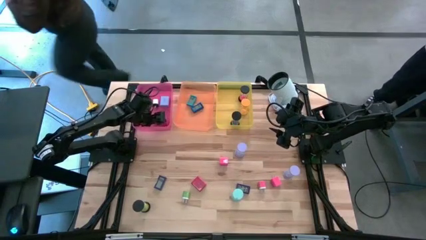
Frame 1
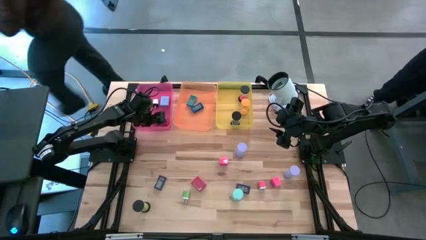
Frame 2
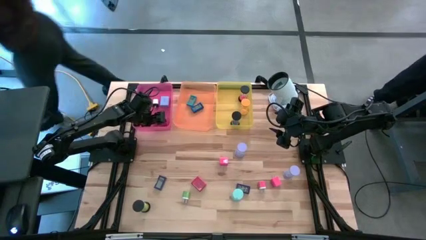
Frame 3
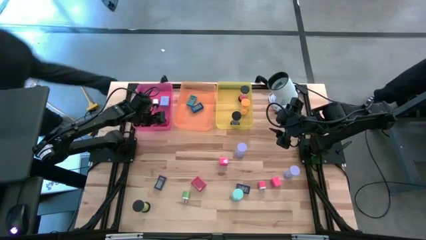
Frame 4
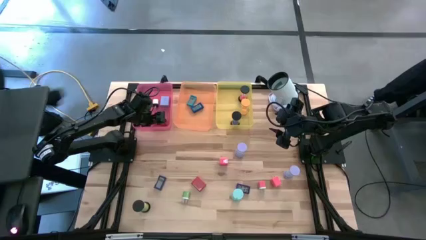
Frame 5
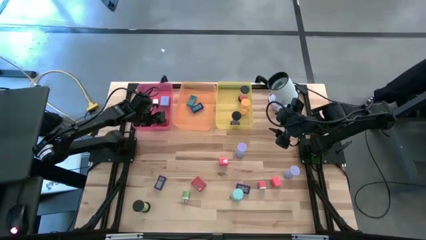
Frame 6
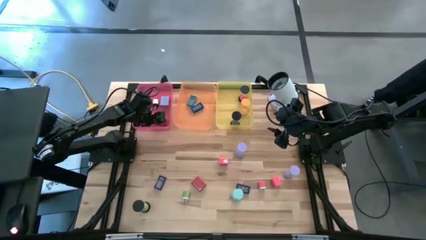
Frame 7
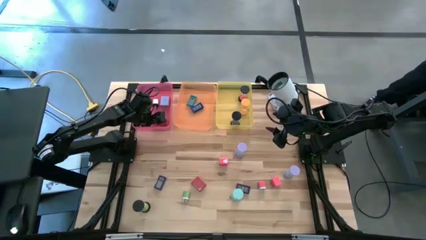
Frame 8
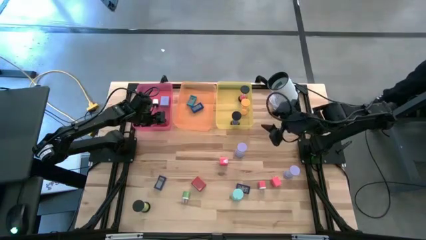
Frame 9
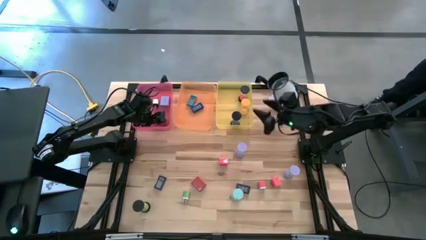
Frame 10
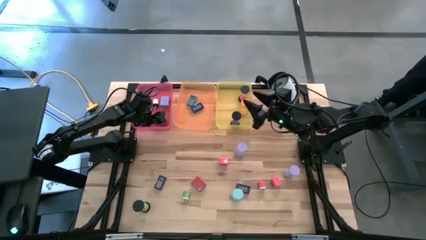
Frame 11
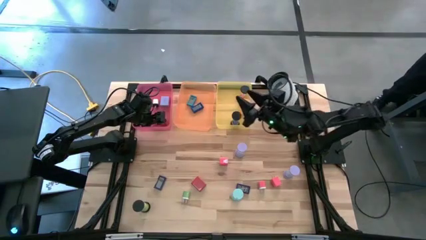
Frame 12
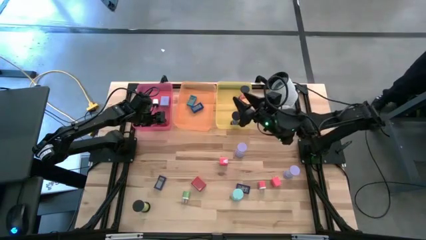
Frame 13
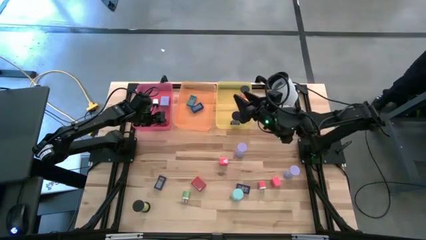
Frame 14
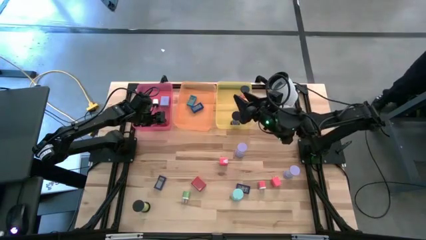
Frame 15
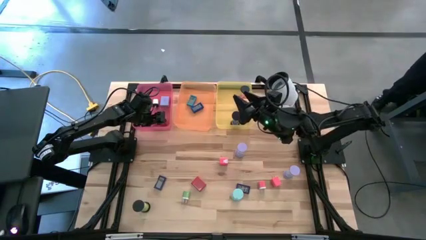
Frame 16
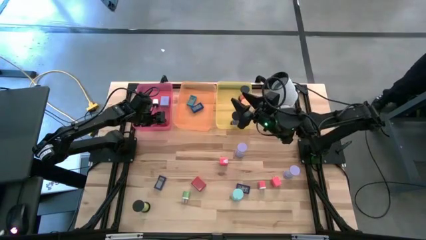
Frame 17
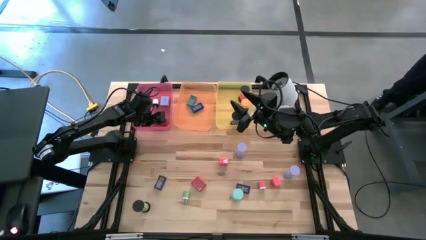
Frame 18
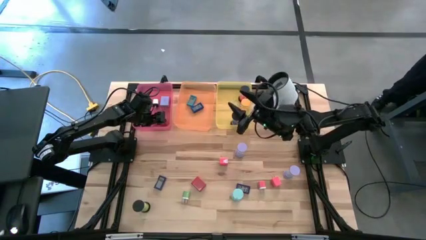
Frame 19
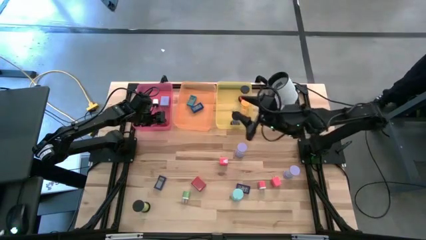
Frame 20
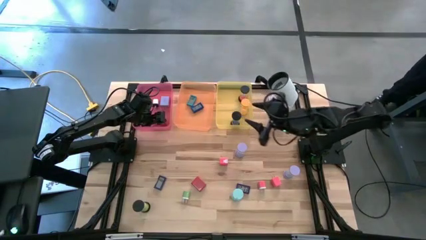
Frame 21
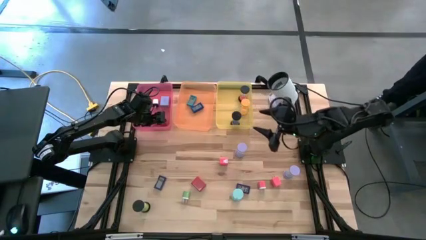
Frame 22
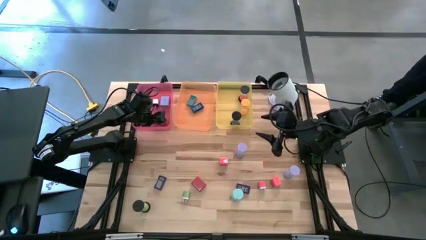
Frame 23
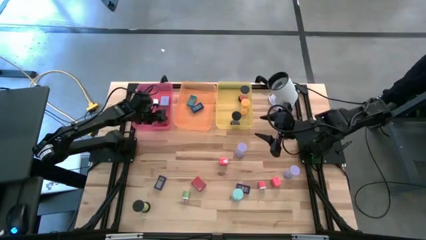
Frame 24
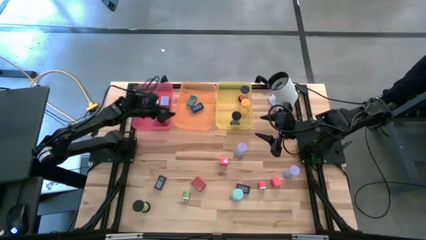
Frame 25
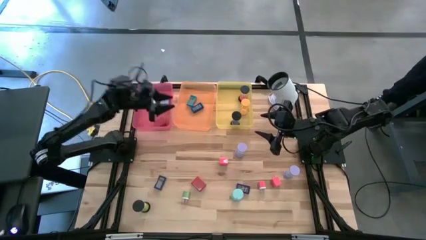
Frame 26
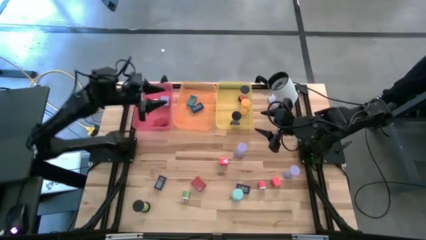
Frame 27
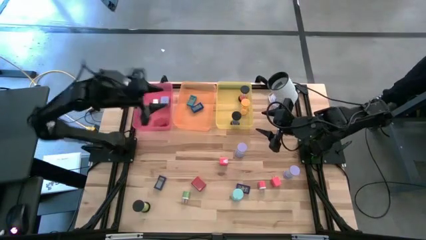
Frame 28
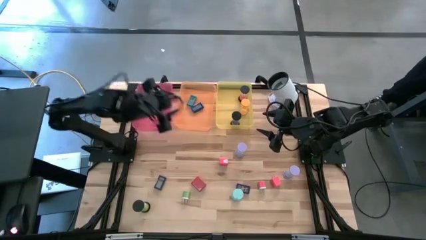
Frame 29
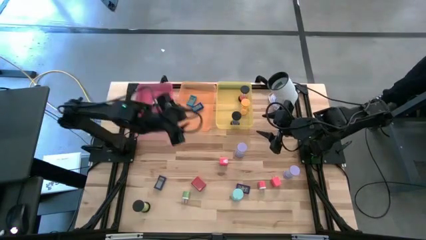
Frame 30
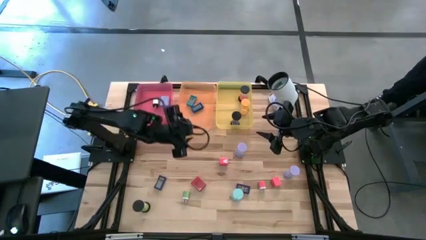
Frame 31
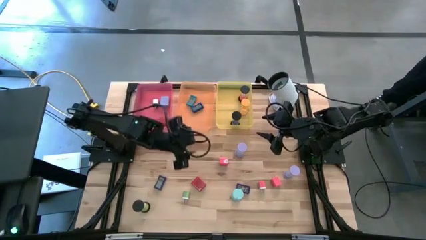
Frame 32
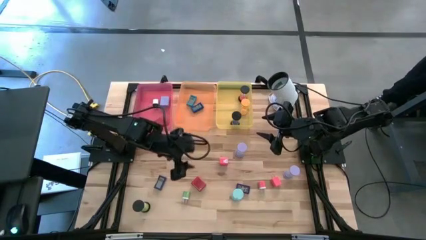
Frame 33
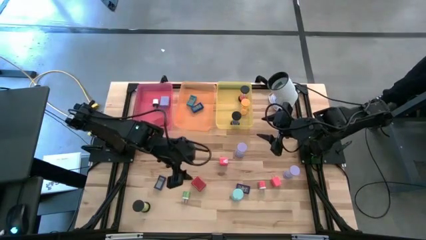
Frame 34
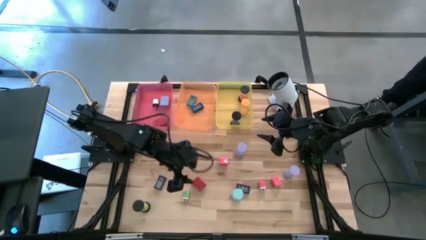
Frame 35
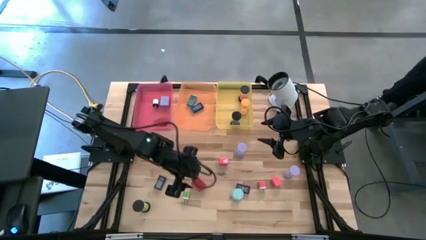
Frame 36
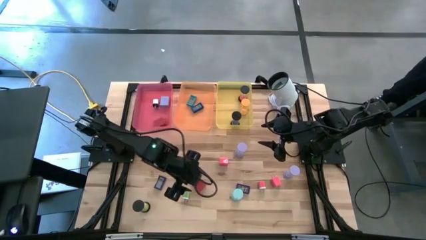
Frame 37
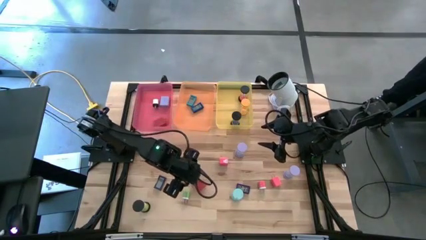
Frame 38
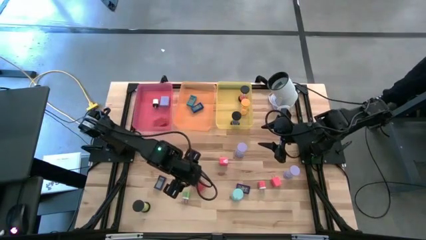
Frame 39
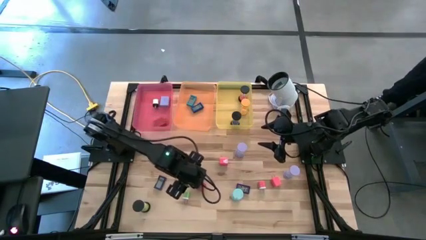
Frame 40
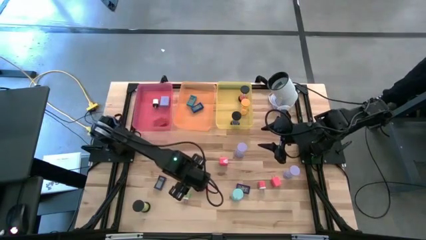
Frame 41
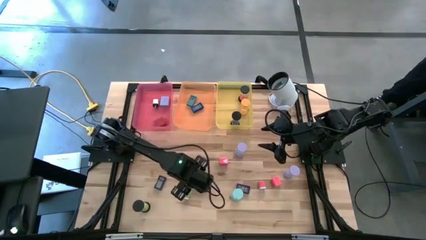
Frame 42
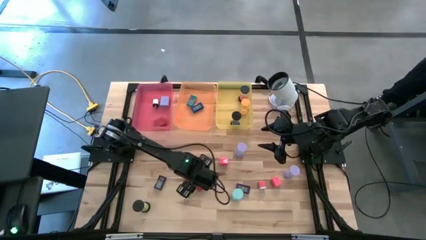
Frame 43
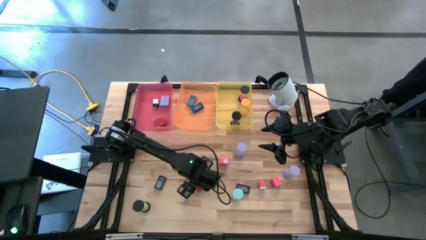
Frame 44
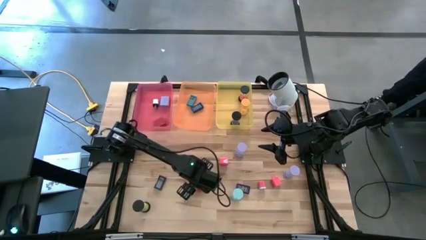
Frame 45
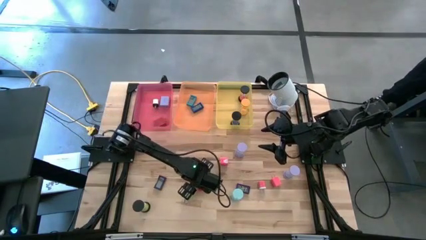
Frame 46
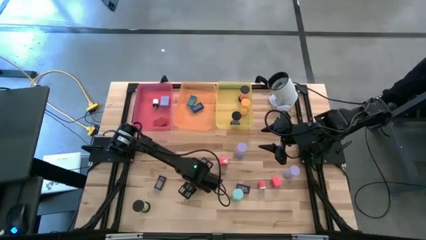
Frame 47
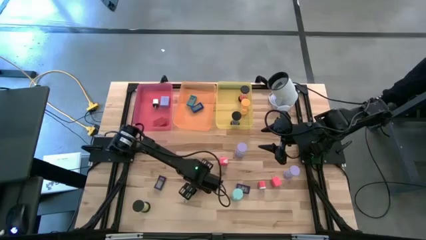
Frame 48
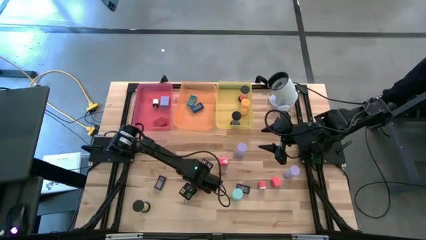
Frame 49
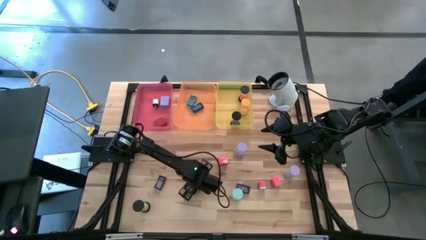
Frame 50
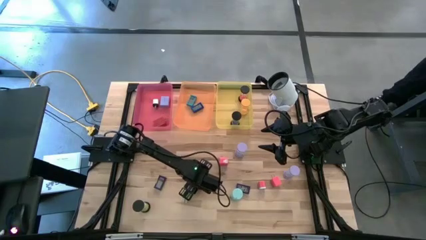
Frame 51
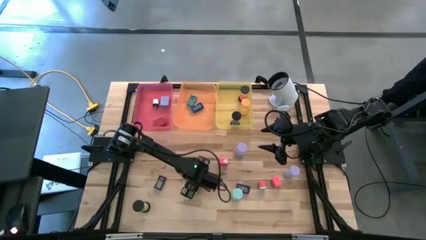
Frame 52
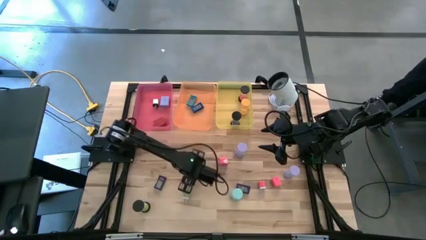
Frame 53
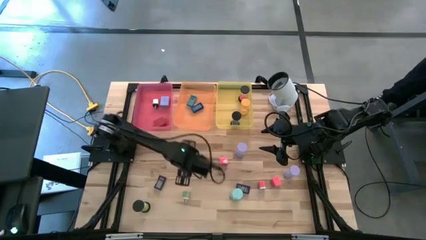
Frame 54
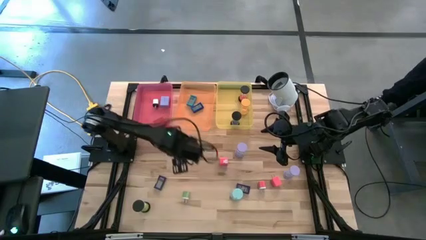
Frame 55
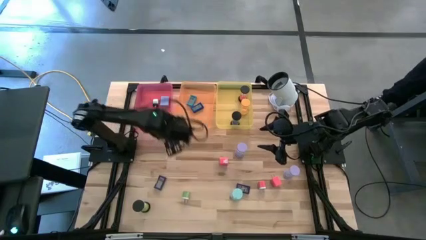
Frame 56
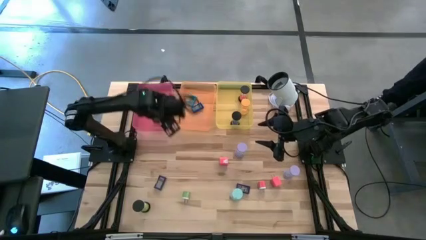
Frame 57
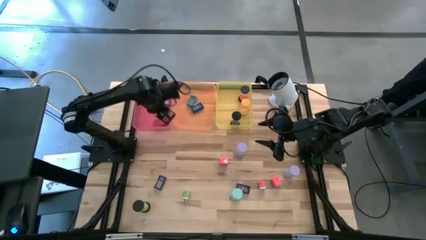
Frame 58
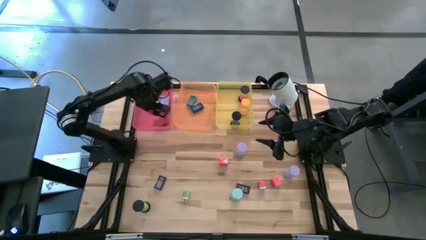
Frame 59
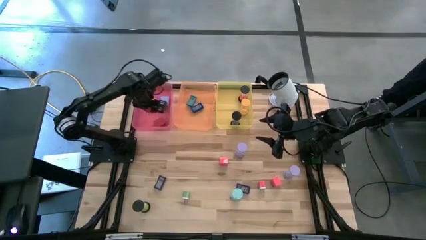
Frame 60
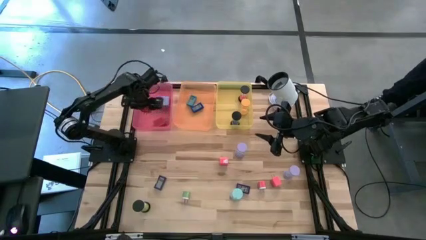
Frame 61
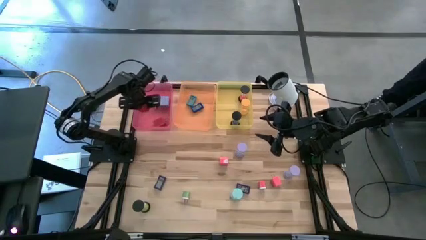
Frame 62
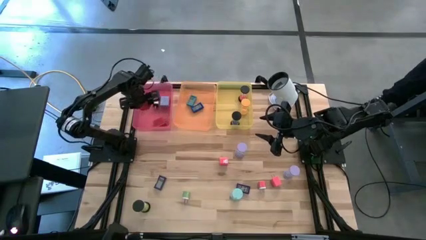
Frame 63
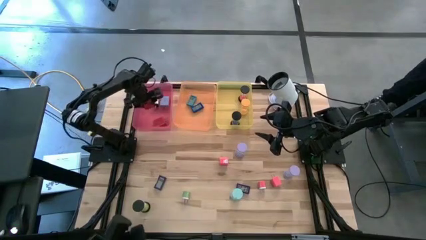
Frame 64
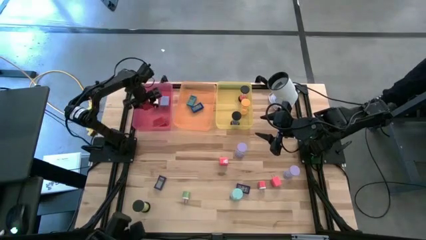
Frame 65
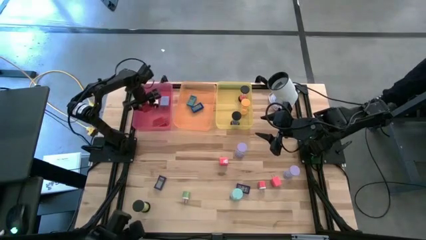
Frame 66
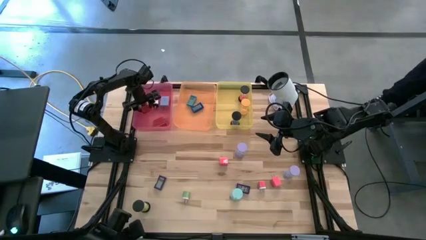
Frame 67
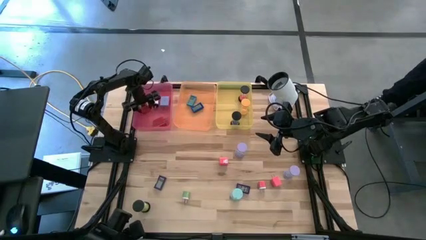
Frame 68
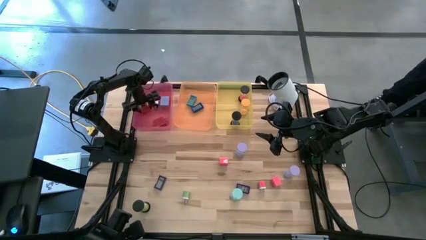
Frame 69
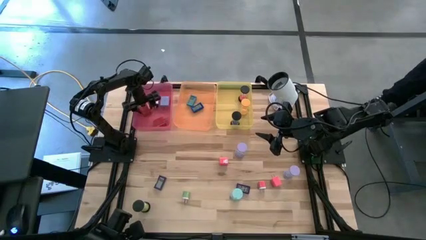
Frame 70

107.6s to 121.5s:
Task: Pick & Place Office items
Put the red charger adapter into the red bin

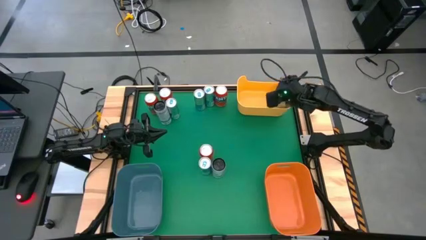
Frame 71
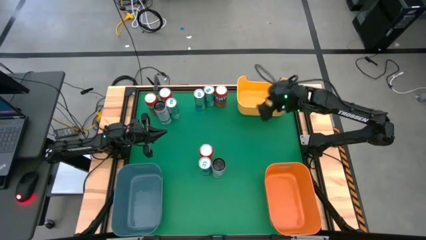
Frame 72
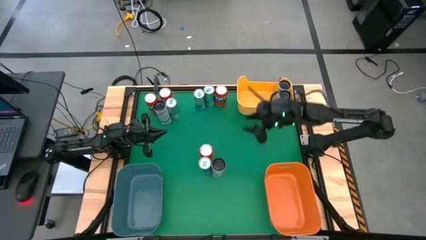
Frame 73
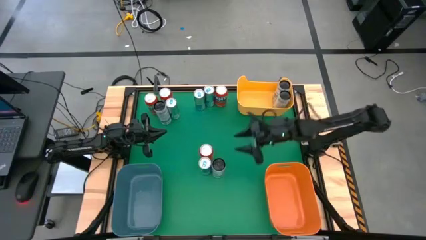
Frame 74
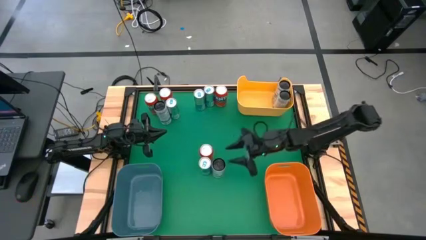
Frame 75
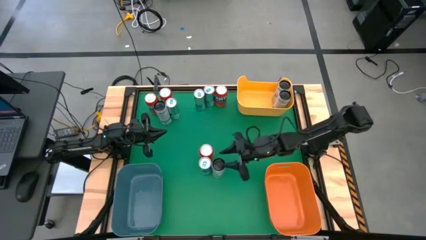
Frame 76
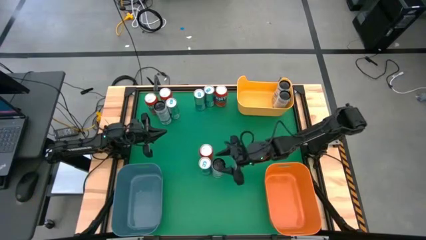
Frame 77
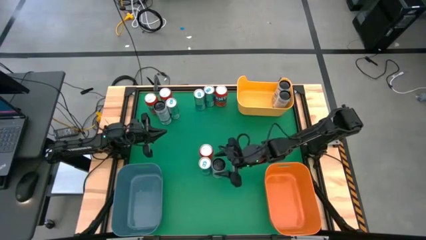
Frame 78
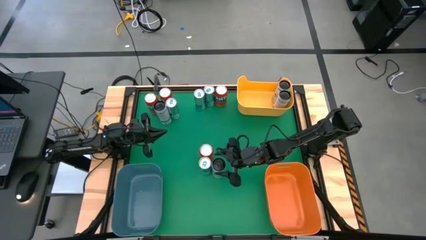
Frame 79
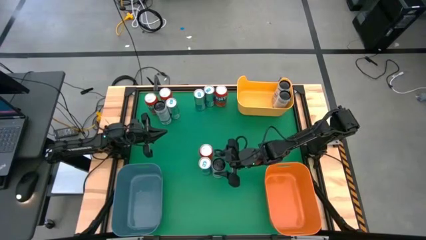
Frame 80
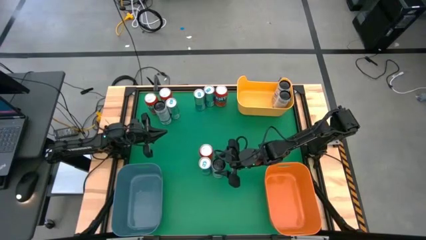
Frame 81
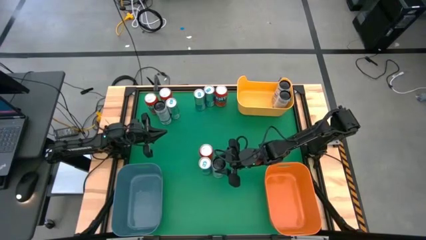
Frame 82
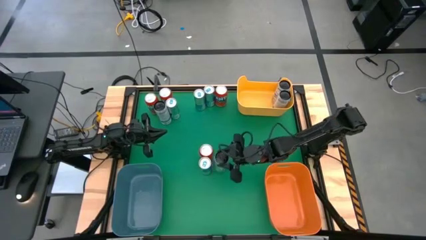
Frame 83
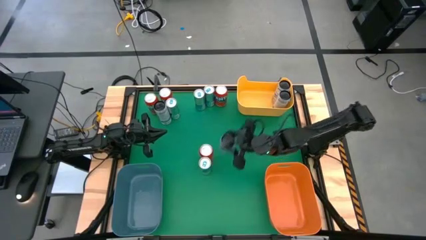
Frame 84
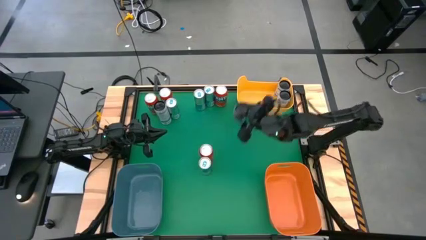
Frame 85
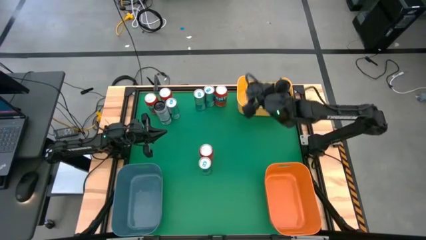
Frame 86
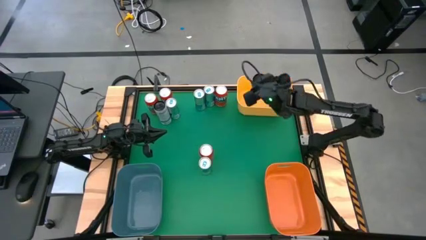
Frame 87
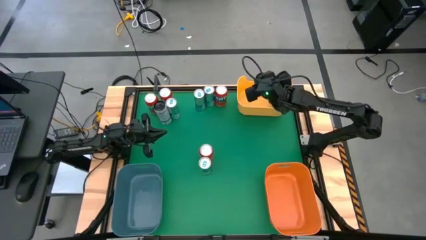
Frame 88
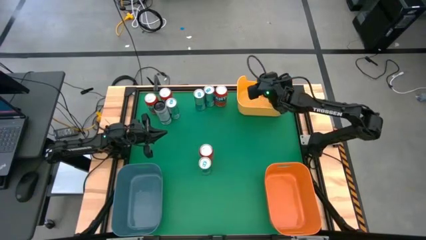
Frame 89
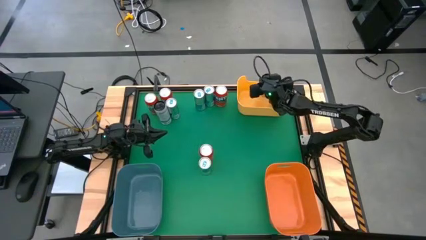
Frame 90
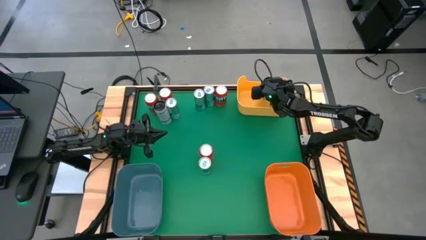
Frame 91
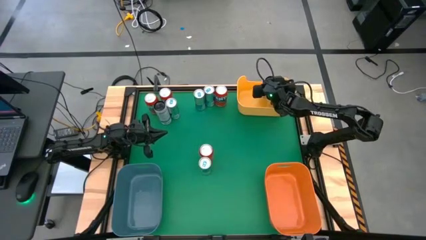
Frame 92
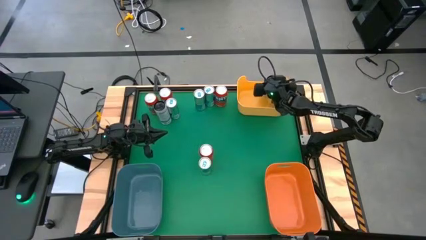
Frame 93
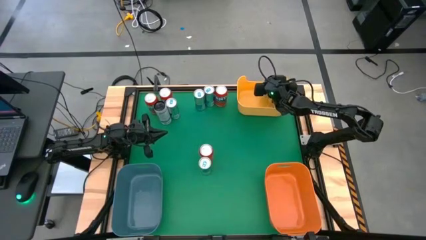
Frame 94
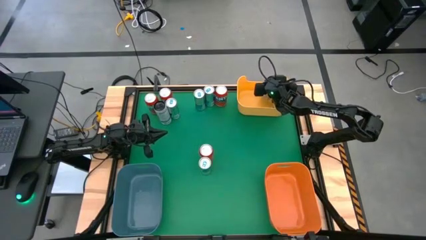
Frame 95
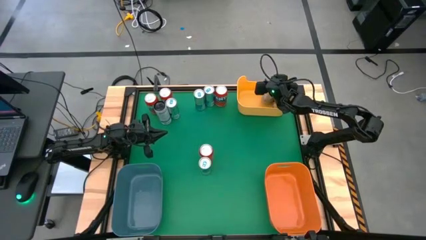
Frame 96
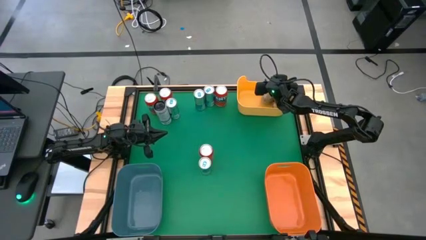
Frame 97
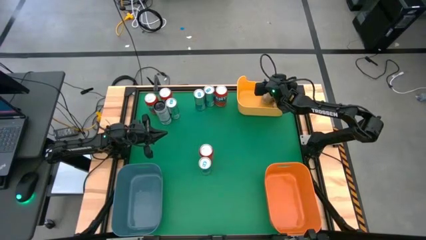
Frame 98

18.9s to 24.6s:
Task: Sort soda cans
Put the white-blue soda can into the yellow bin
